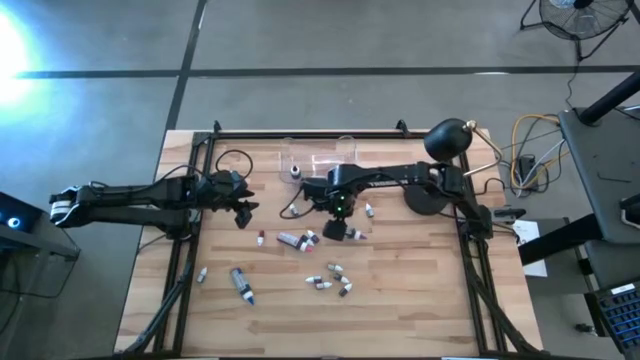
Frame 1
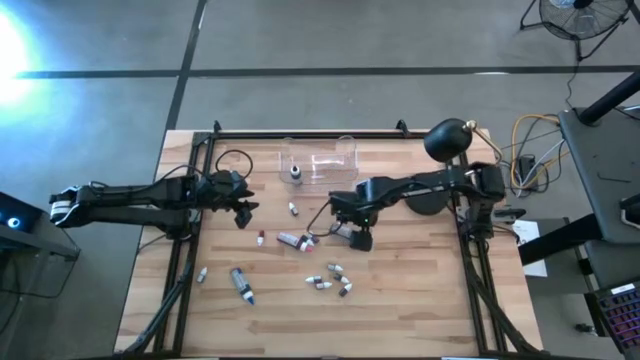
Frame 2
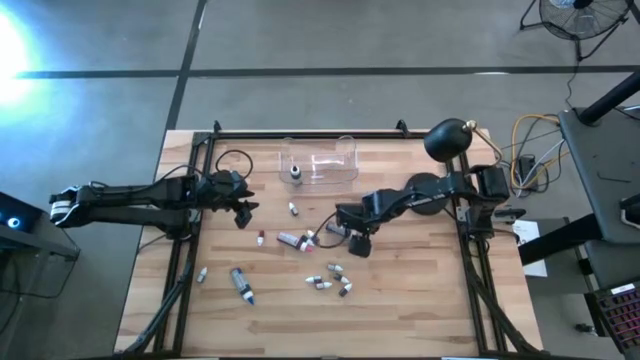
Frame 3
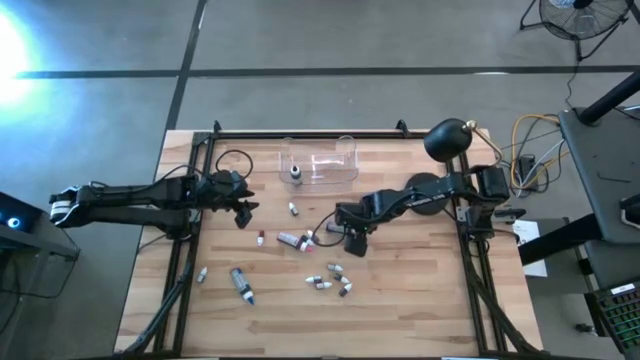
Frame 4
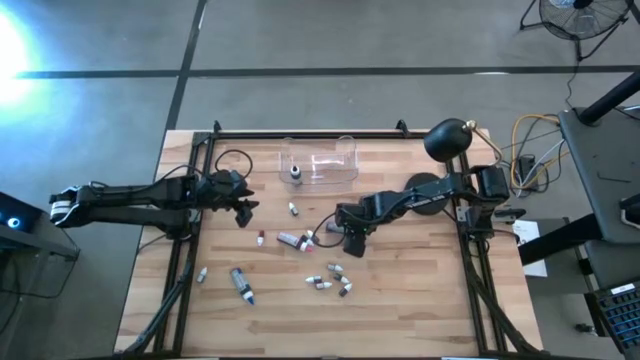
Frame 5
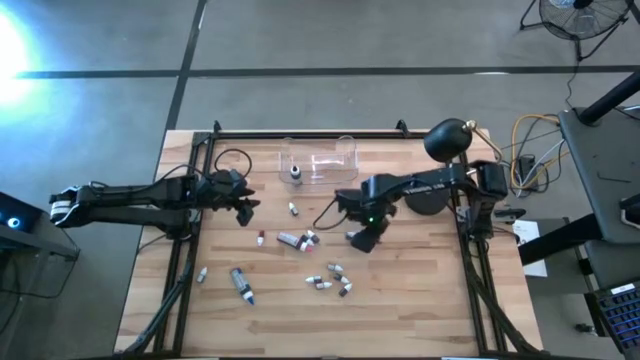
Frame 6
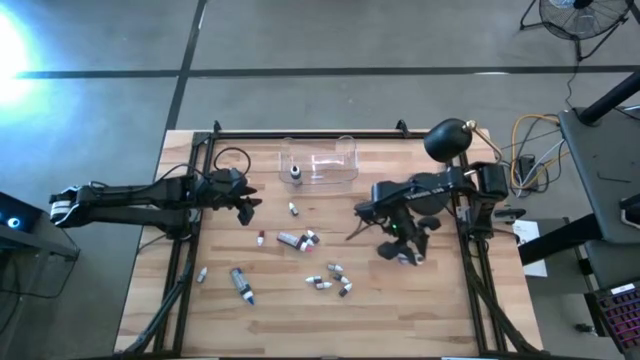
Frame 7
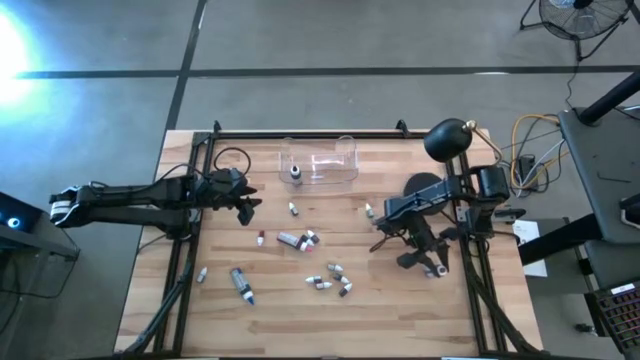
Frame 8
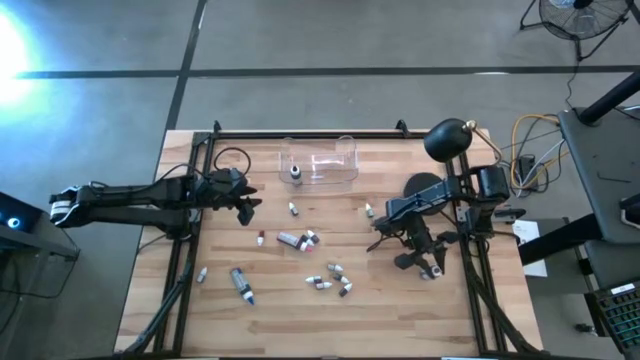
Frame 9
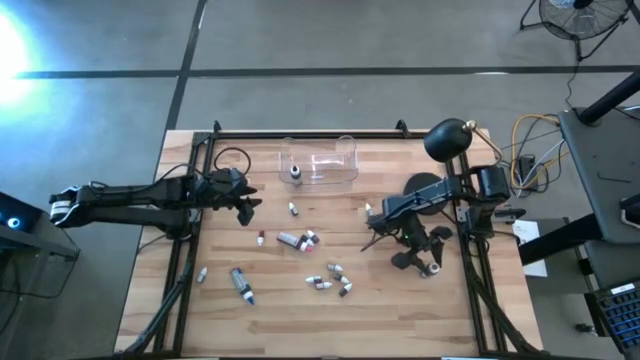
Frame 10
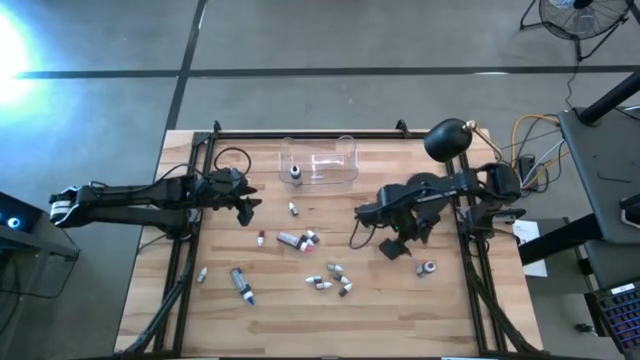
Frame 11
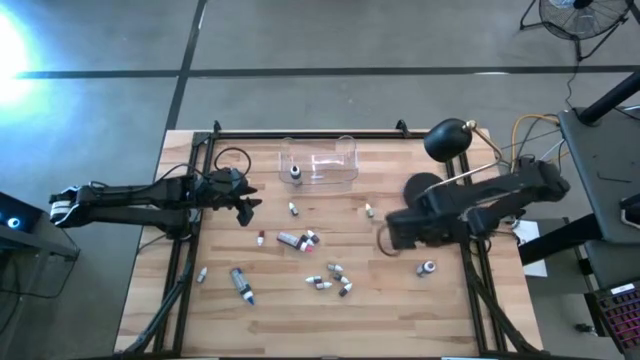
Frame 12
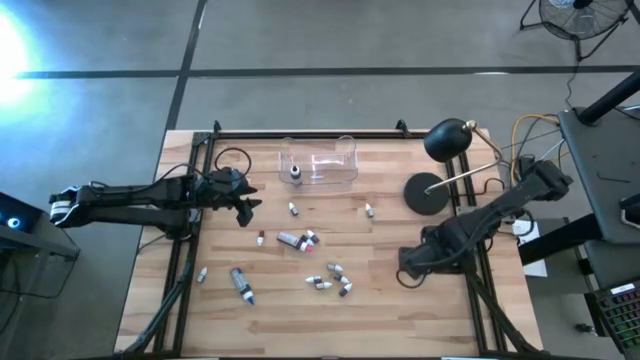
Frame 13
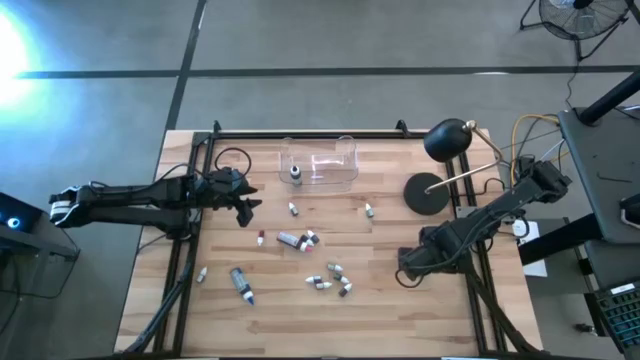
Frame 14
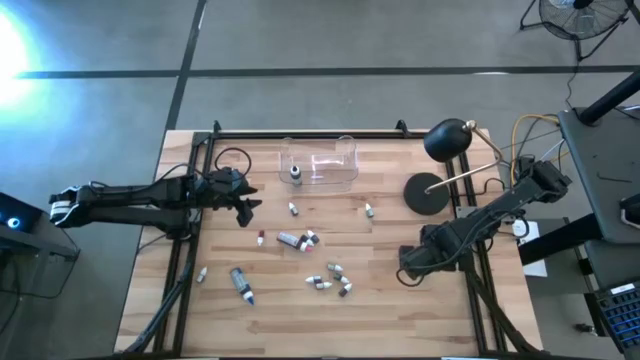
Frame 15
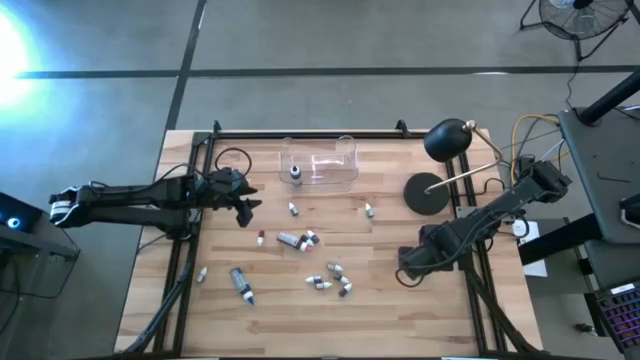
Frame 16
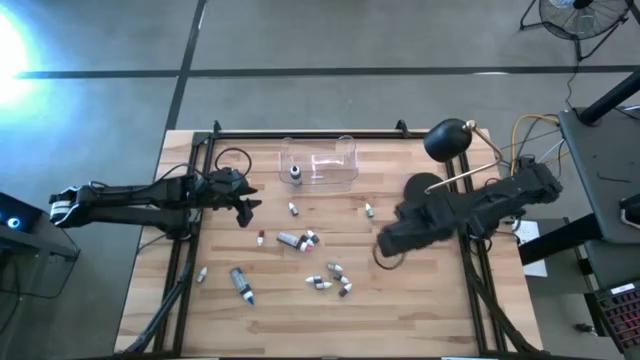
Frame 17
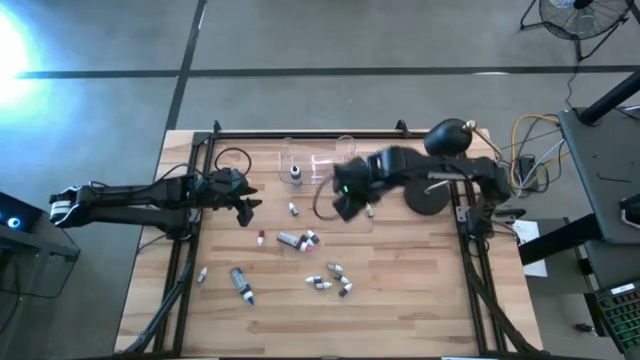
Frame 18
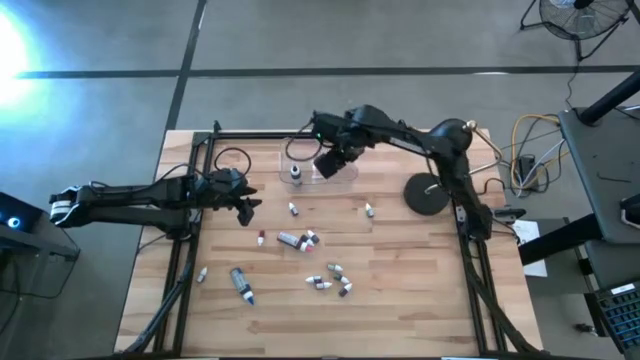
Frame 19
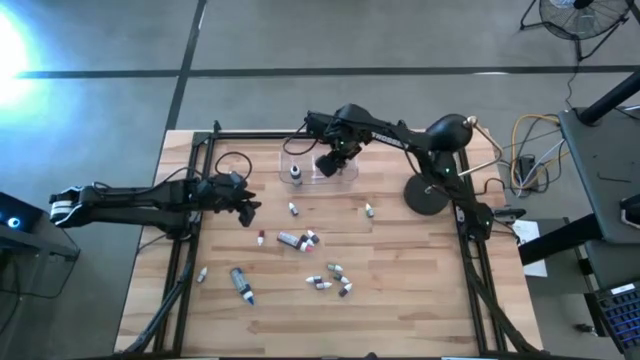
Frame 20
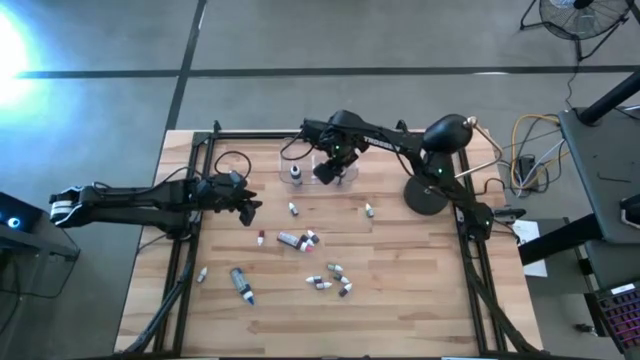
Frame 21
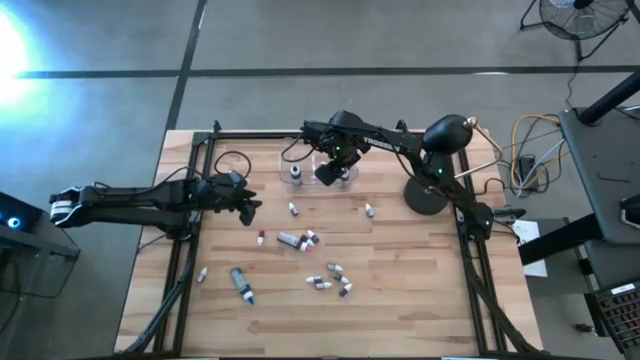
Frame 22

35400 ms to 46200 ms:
Task: Pick & Place food coloring
Put the large purple food coloring bottle into the transparent bin

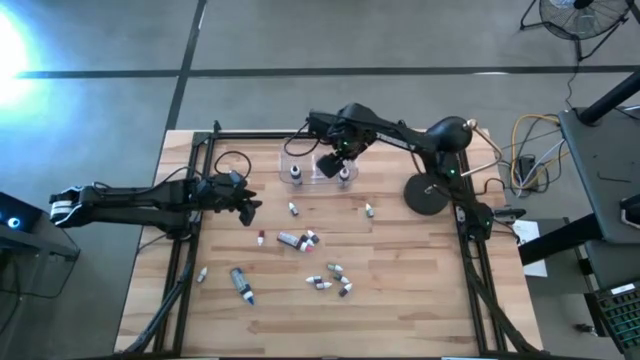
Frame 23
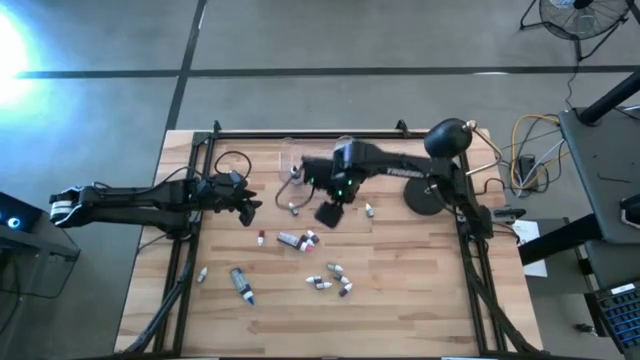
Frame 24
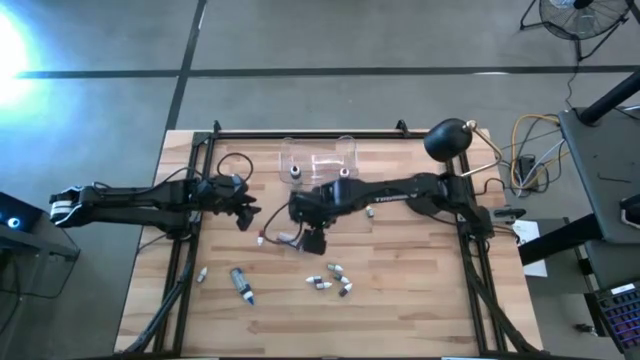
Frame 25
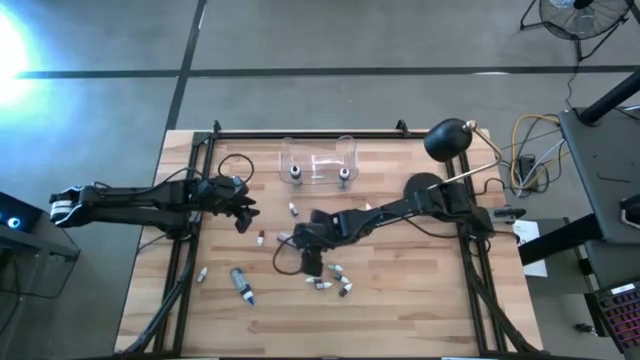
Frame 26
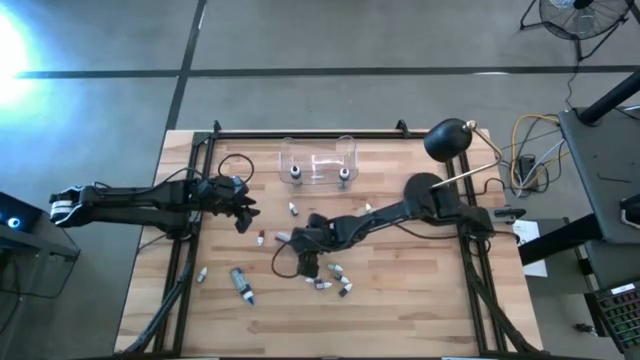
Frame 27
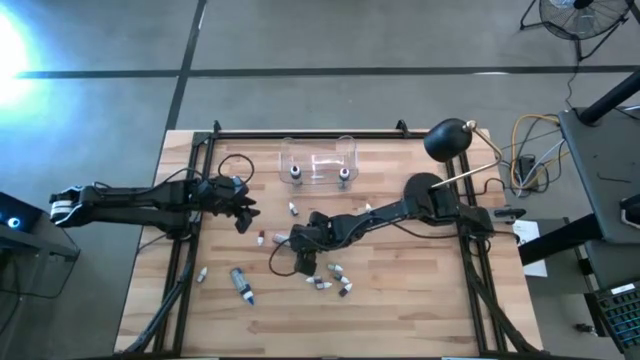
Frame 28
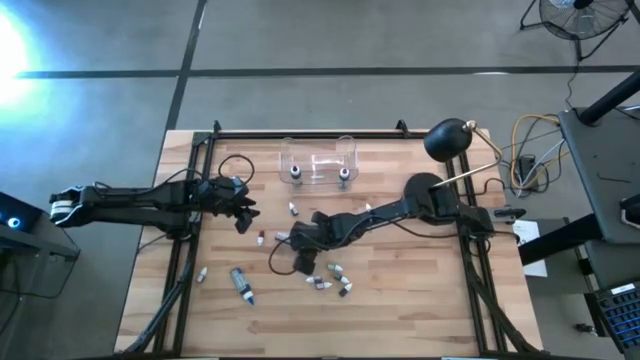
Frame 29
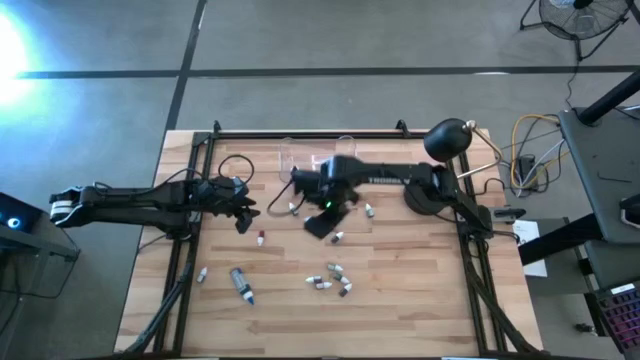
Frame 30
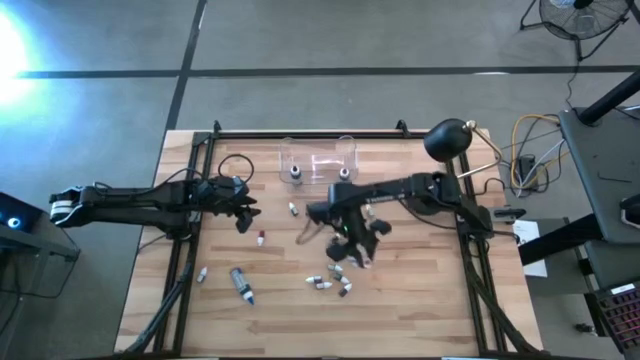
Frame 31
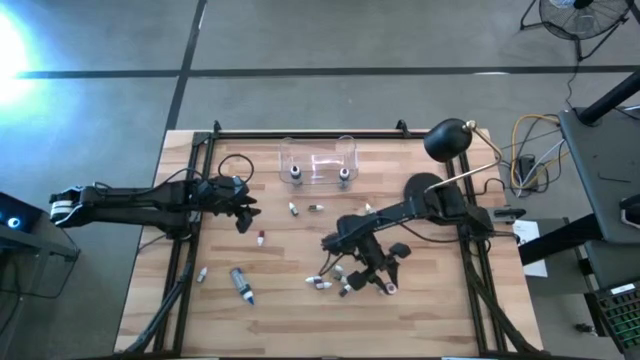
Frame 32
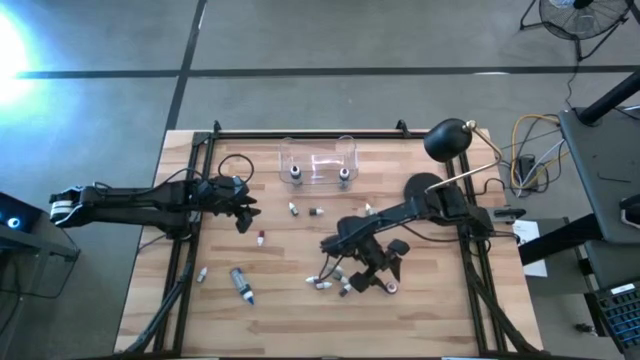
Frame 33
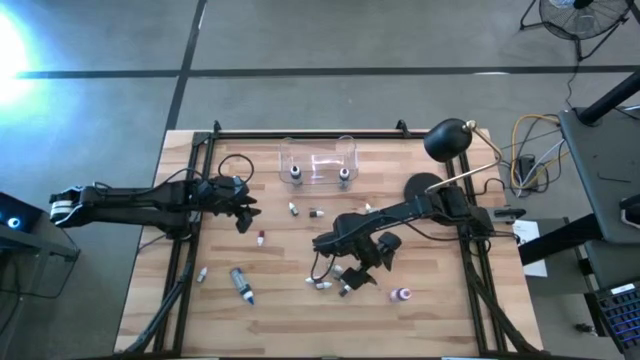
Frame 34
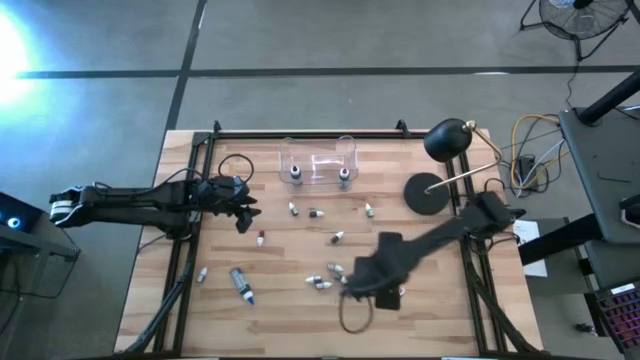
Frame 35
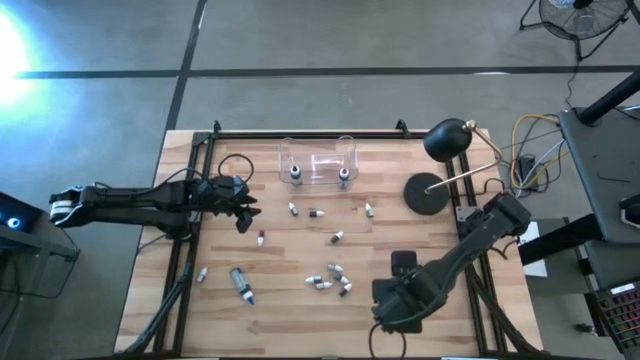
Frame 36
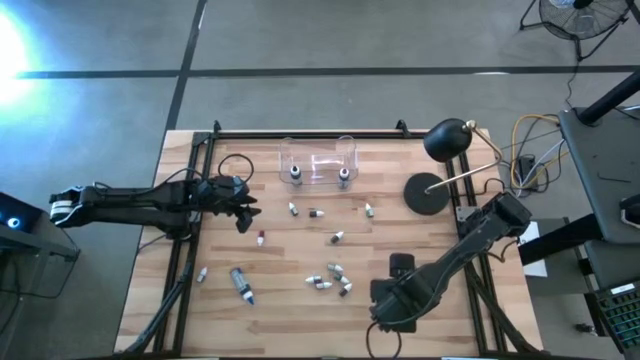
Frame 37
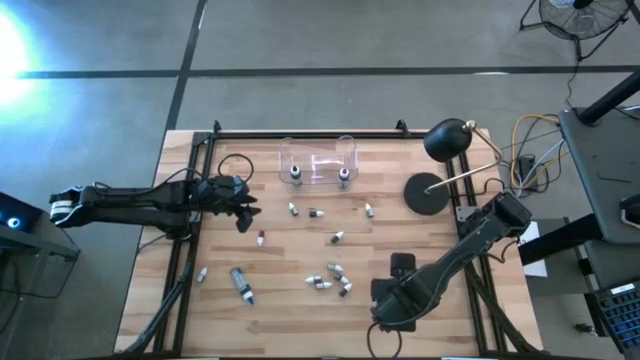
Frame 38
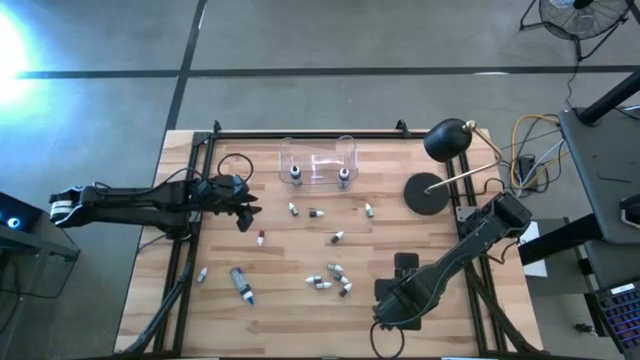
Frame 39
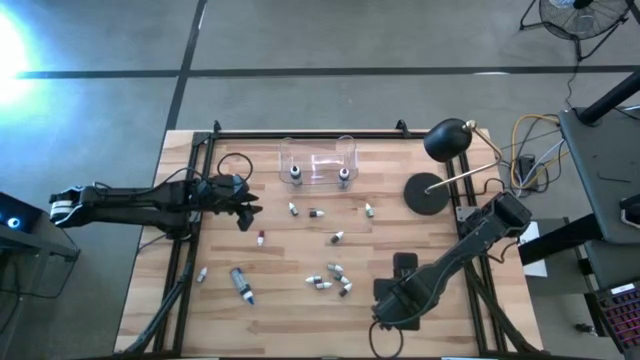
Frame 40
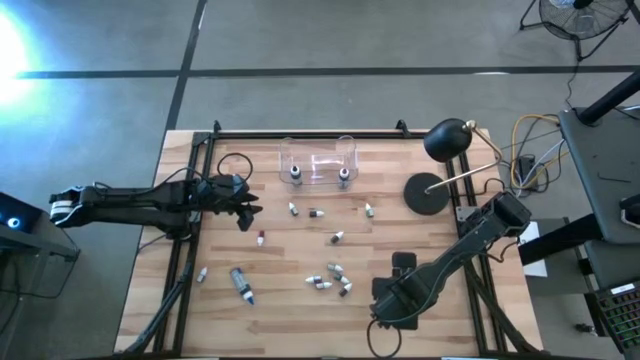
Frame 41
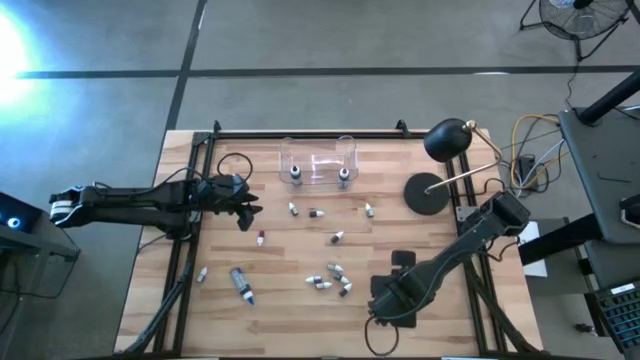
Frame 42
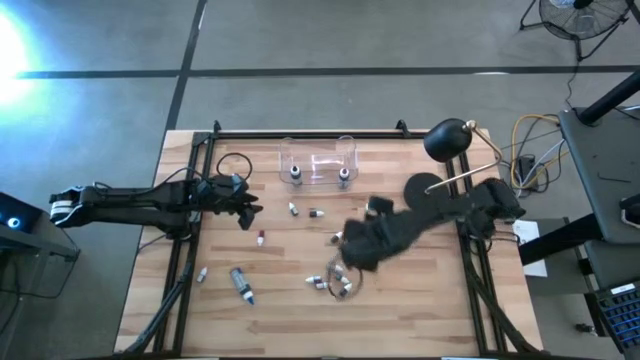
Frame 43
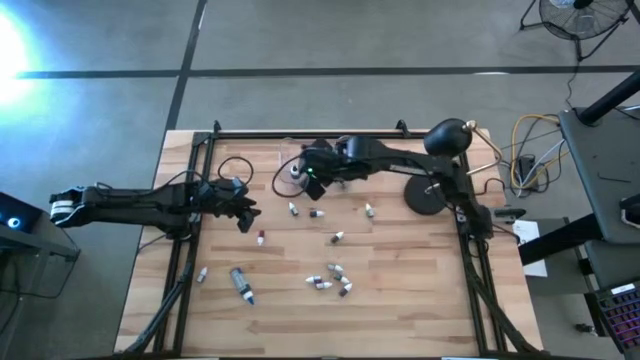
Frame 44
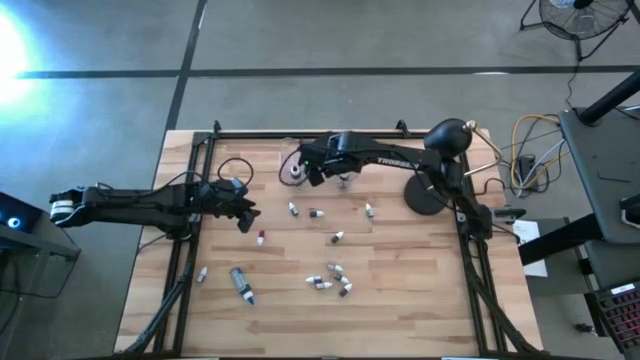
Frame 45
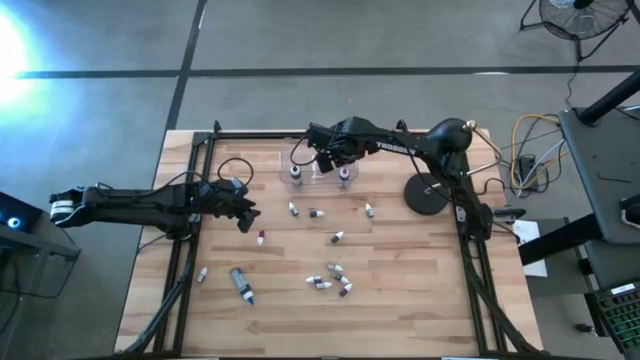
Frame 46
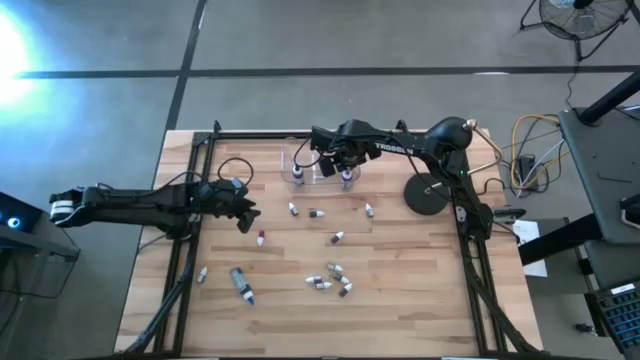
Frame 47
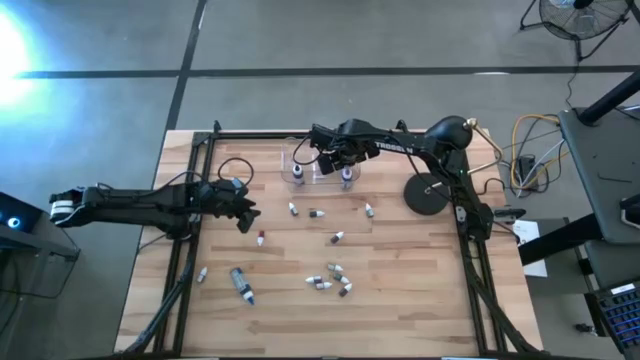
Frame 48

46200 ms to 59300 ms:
Put the large pink food coloring bottle into the transparent bin
